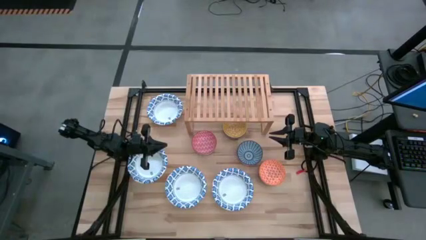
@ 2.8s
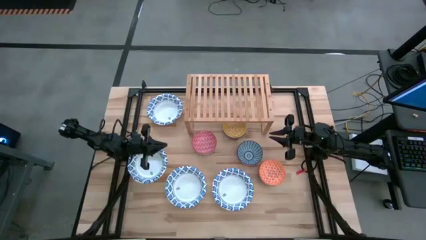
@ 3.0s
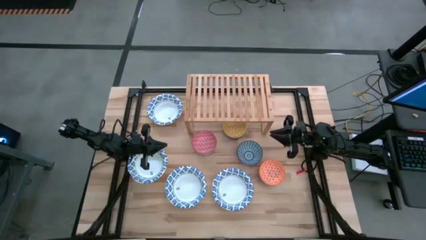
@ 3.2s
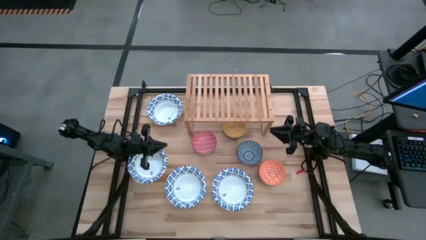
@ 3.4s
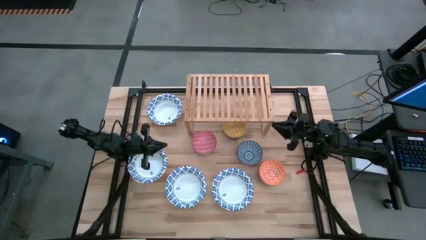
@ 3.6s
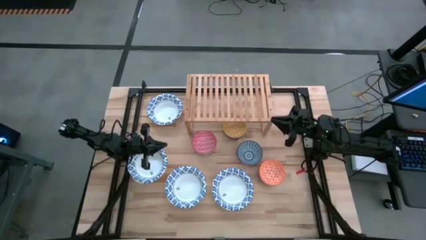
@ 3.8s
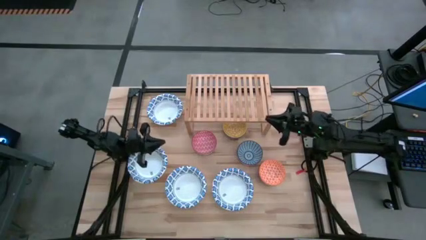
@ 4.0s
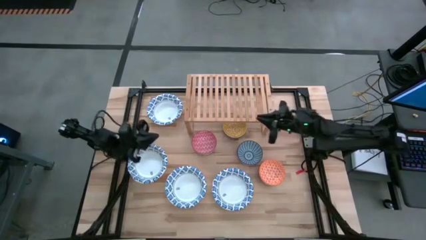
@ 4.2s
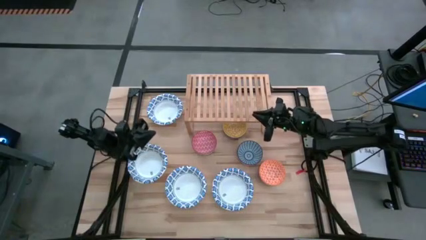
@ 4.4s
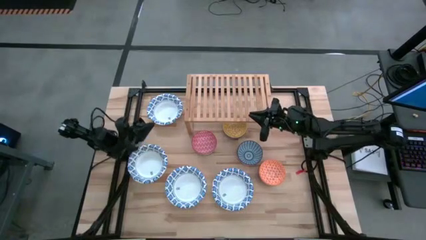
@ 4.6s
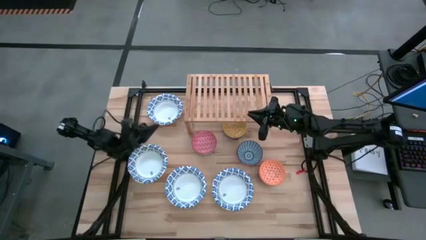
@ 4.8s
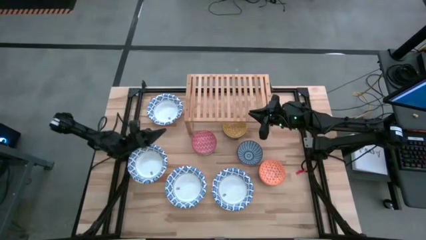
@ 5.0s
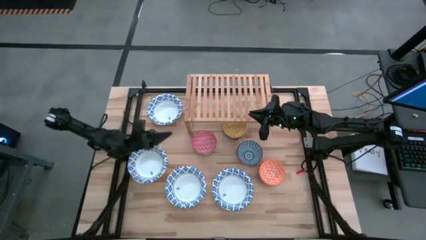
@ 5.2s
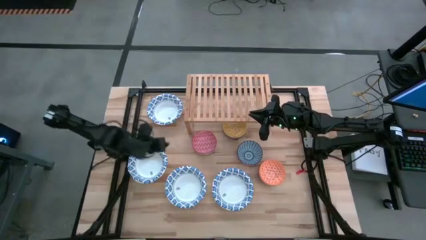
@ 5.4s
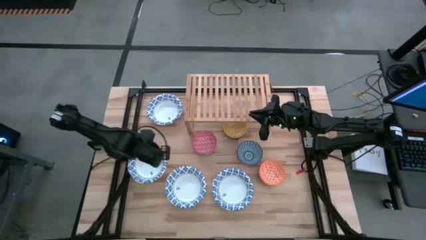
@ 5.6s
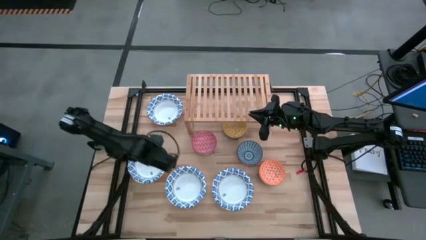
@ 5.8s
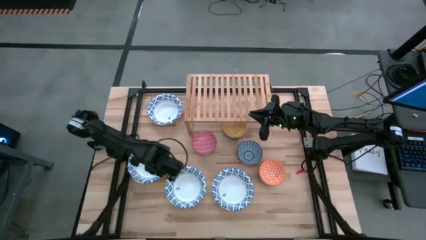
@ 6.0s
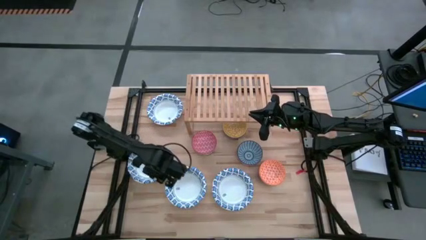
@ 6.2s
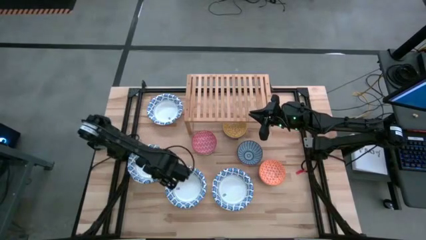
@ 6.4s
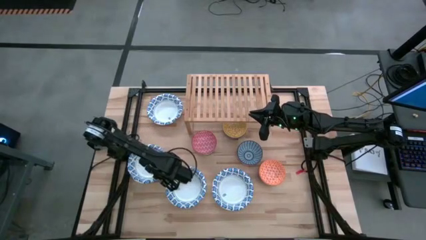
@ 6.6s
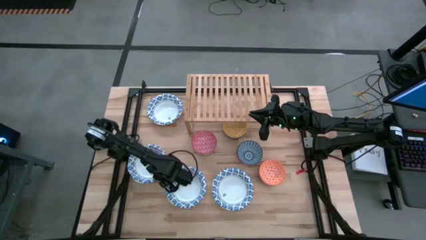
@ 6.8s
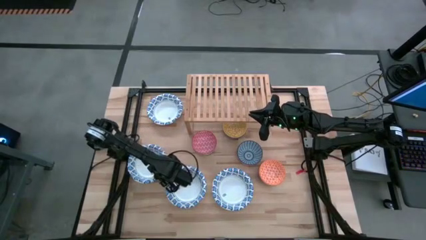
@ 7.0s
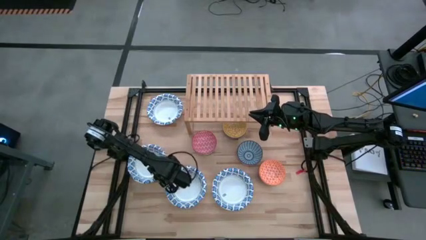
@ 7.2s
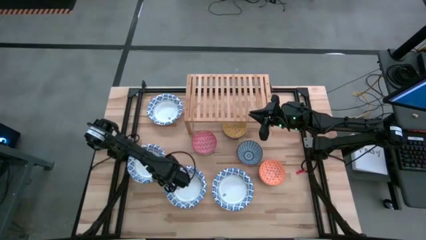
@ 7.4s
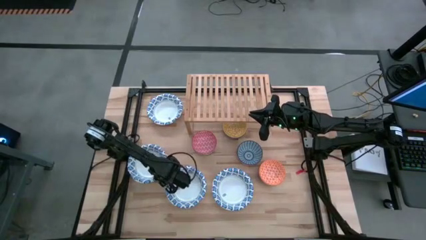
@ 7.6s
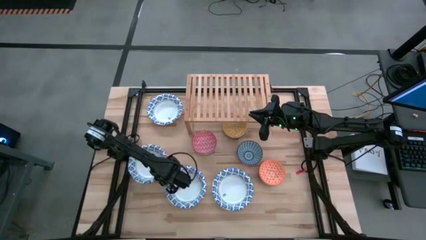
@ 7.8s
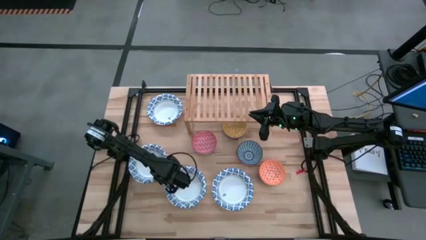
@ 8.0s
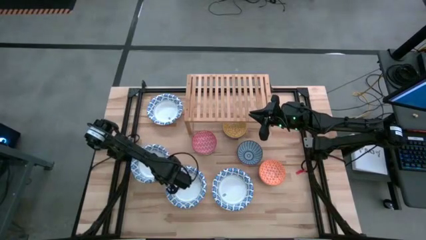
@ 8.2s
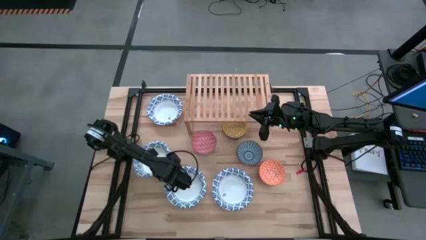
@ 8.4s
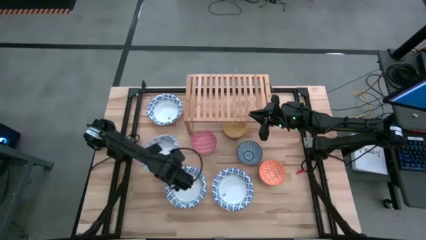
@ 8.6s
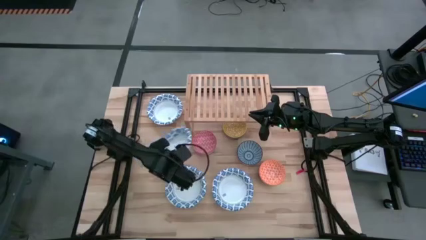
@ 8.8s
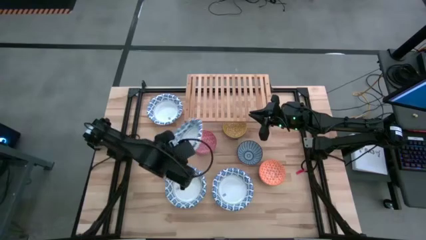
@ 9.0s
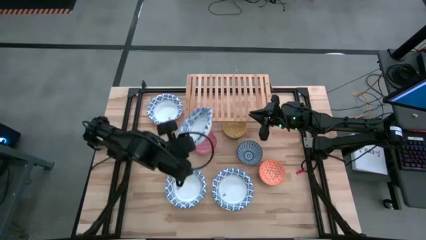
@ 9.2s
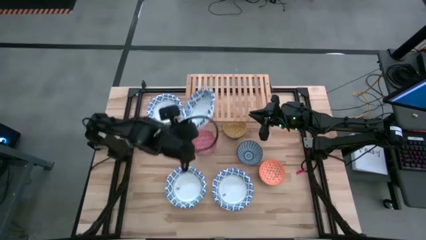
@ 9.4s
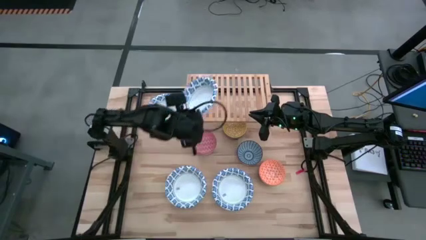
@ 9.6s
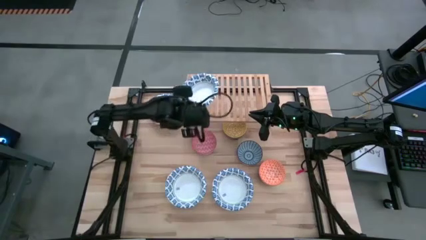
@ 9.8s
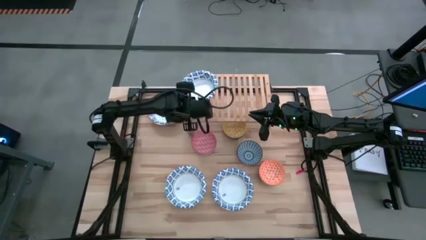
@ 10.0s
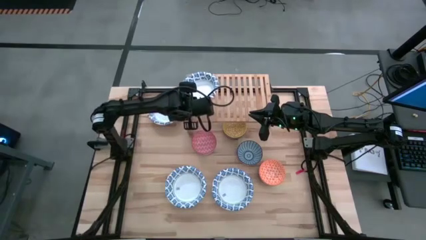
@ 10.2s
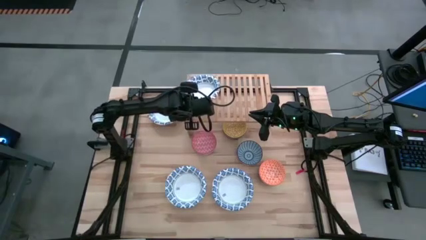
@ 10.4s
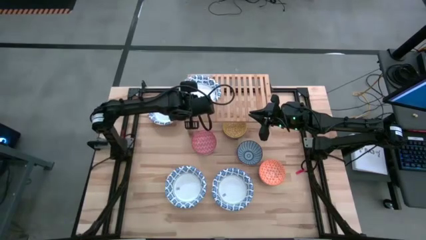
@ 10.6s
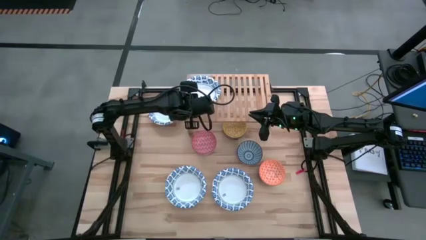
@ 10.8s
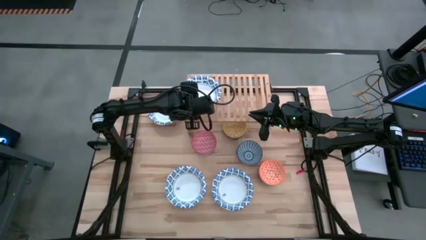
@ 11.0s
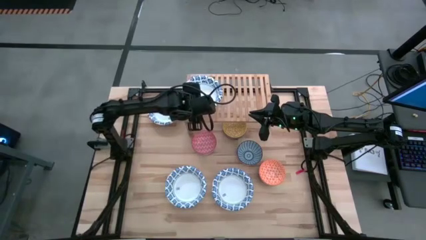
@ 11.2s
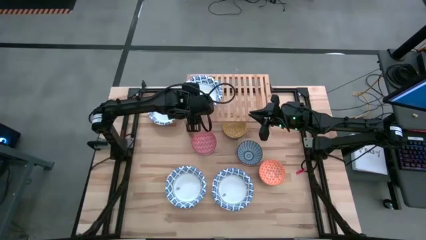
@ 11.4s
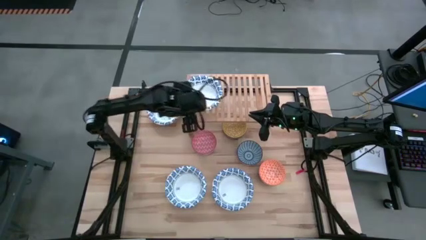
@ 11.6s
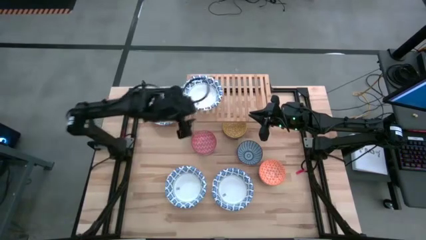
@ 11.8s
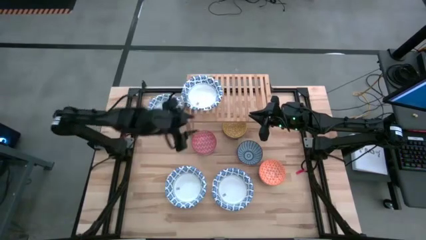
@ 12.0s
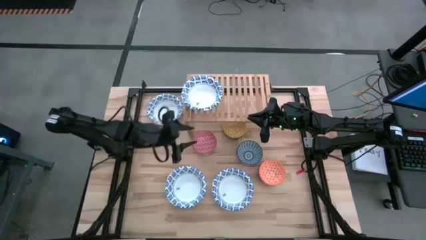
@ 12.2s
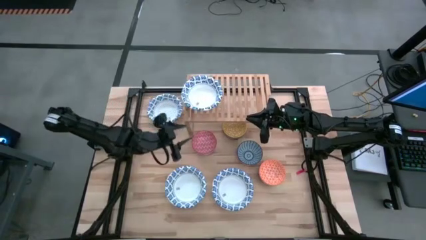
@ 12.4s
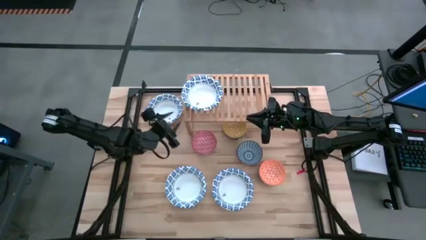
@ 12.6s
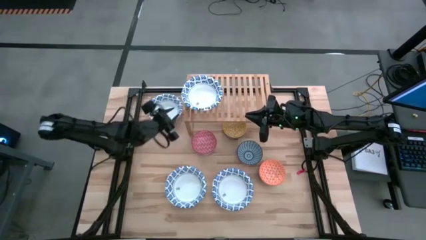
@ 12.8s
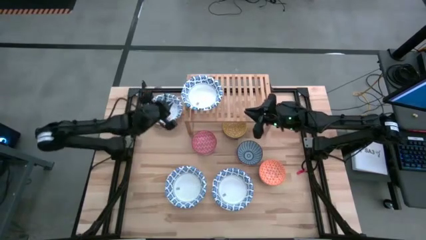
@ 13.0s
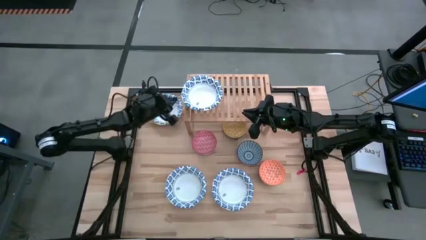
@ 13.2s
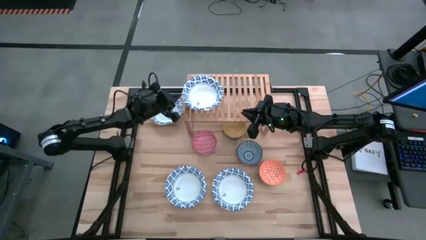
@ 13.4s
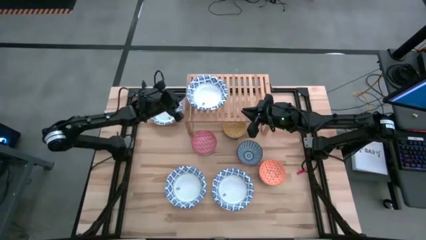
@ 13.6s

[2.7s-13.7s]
Task: Place and stack bowls onto a shelf
Put the middle left white bowl on the shelf
